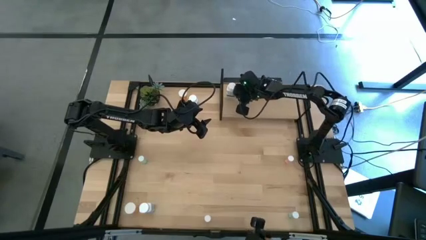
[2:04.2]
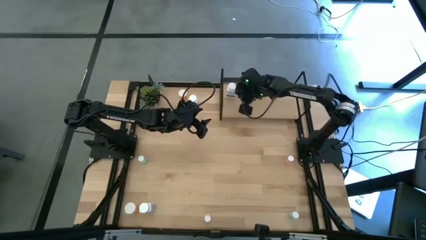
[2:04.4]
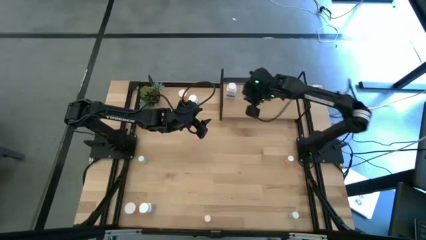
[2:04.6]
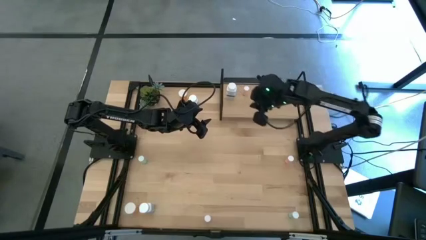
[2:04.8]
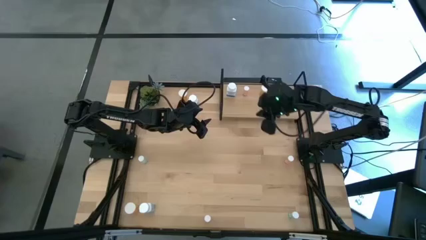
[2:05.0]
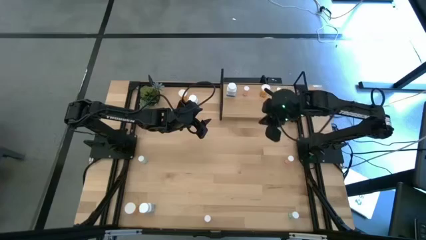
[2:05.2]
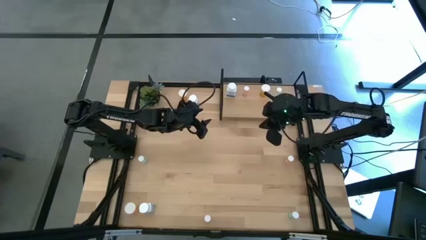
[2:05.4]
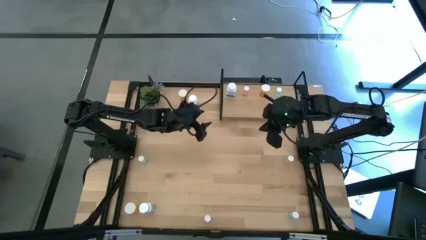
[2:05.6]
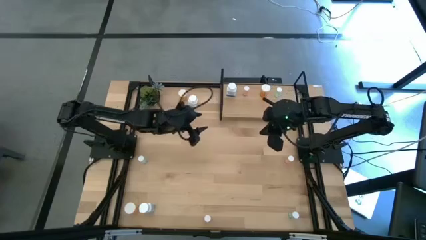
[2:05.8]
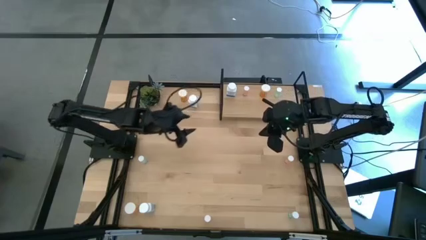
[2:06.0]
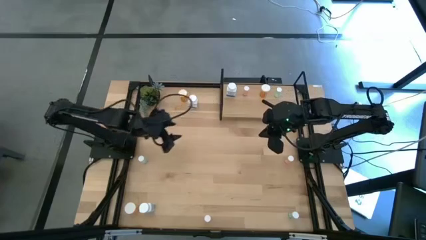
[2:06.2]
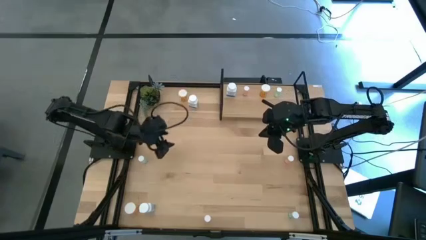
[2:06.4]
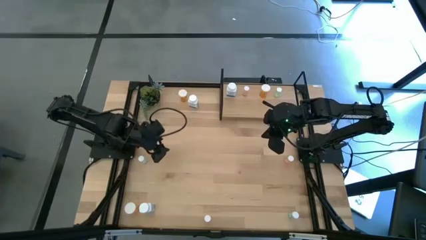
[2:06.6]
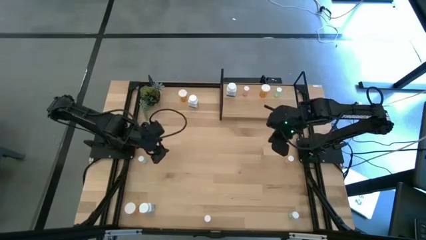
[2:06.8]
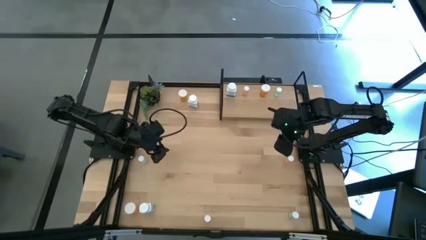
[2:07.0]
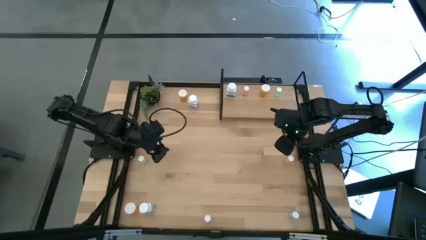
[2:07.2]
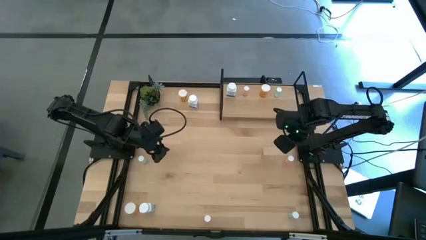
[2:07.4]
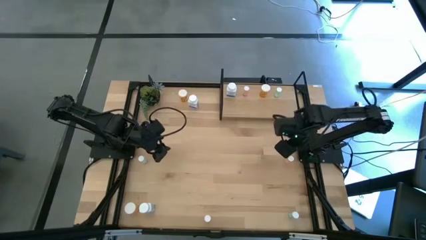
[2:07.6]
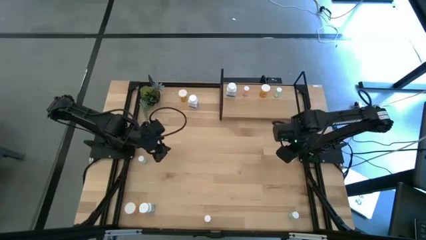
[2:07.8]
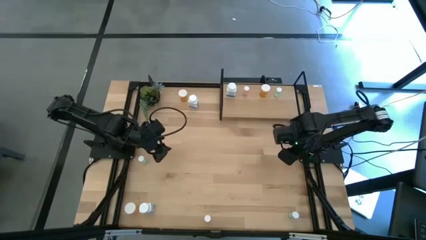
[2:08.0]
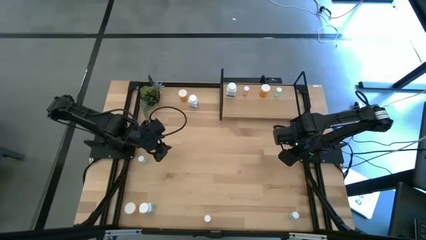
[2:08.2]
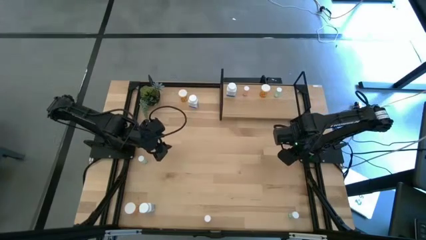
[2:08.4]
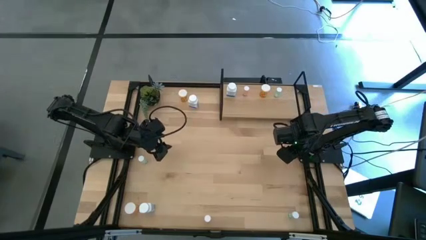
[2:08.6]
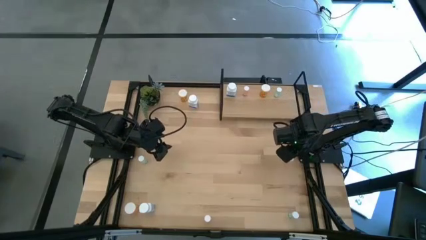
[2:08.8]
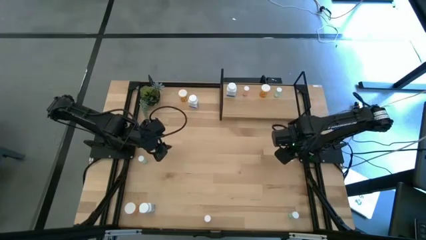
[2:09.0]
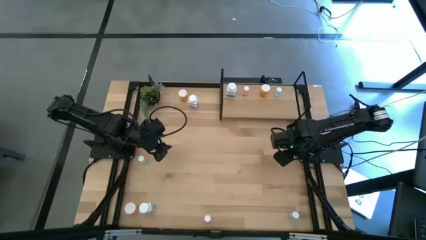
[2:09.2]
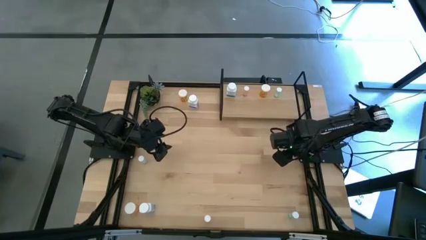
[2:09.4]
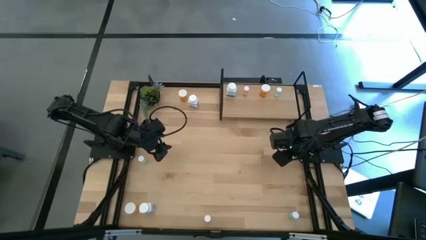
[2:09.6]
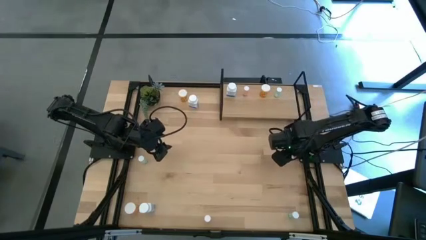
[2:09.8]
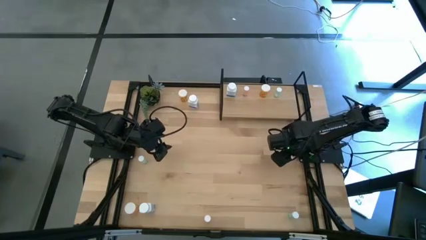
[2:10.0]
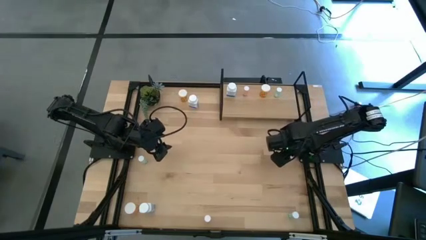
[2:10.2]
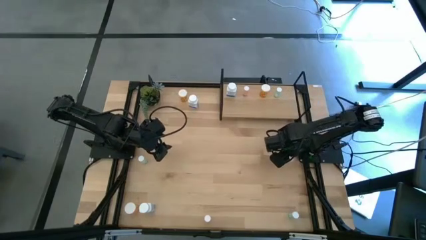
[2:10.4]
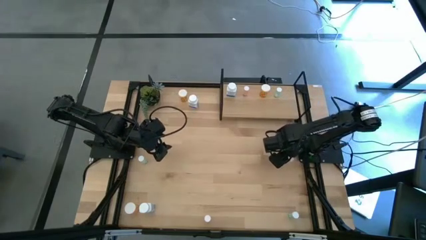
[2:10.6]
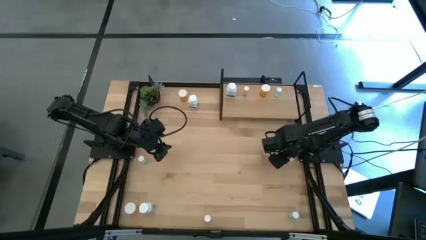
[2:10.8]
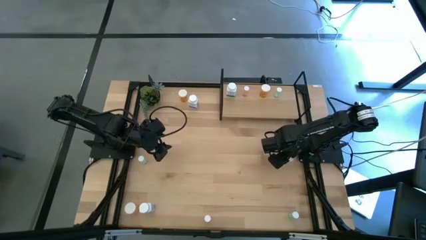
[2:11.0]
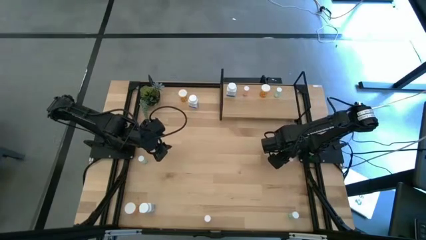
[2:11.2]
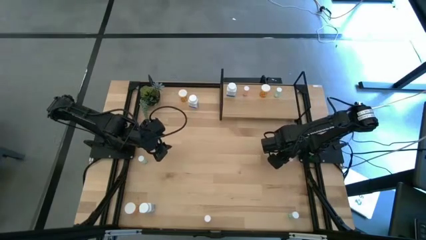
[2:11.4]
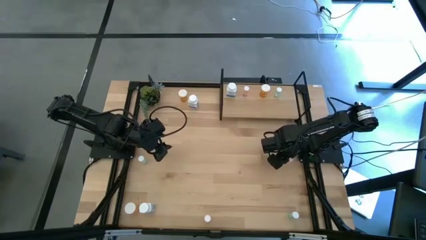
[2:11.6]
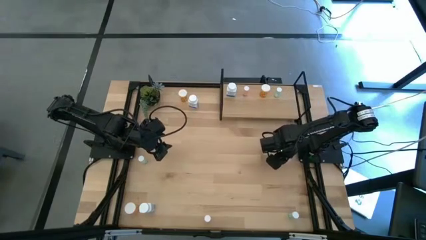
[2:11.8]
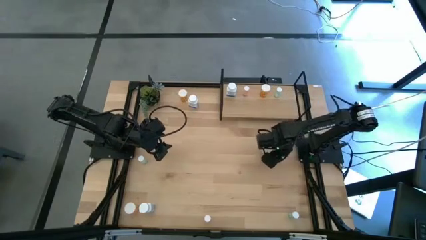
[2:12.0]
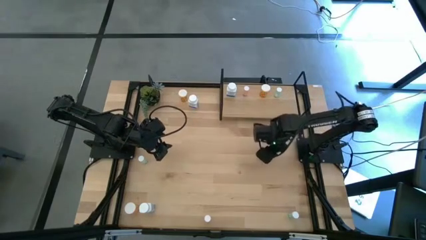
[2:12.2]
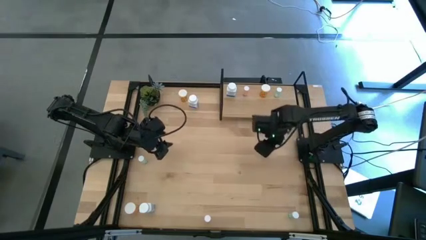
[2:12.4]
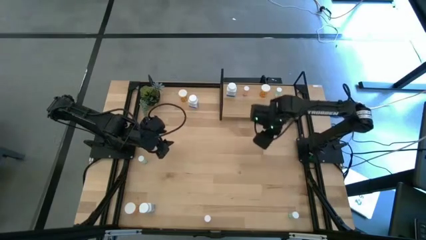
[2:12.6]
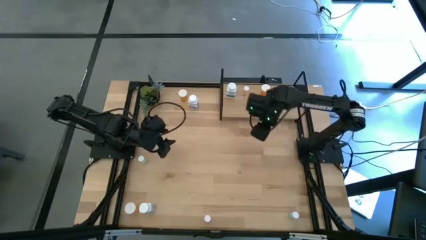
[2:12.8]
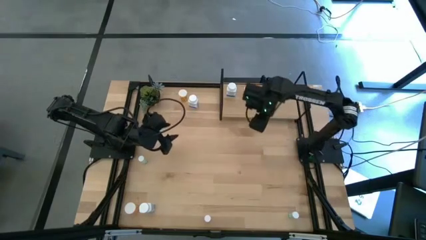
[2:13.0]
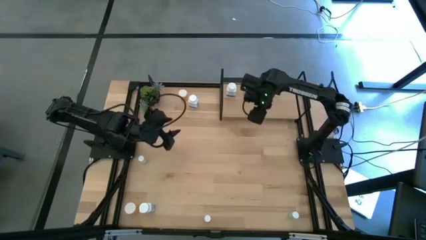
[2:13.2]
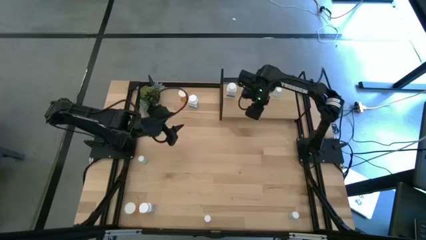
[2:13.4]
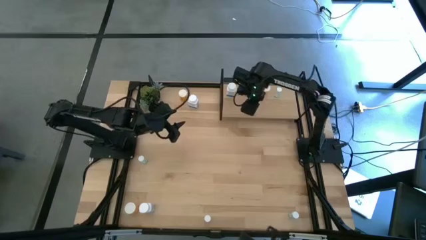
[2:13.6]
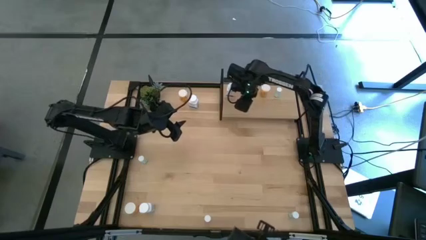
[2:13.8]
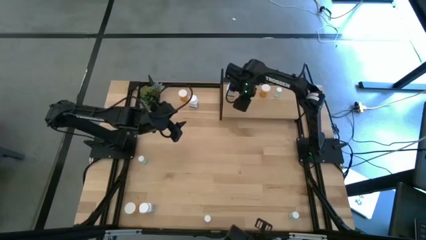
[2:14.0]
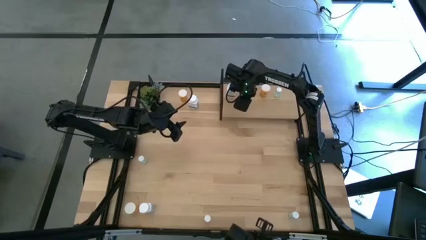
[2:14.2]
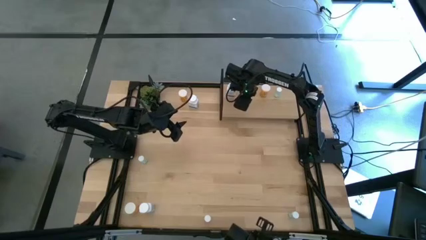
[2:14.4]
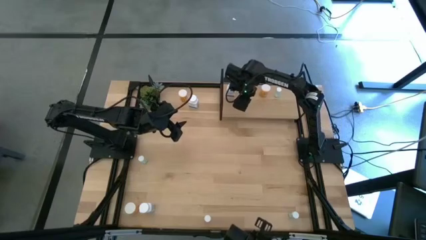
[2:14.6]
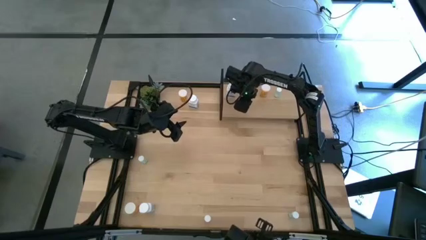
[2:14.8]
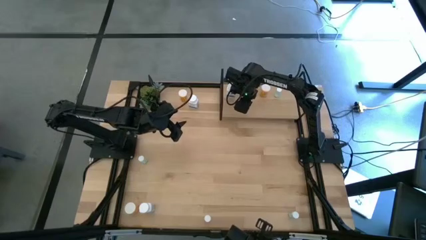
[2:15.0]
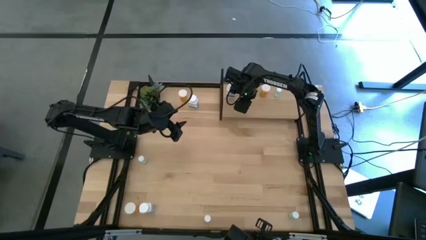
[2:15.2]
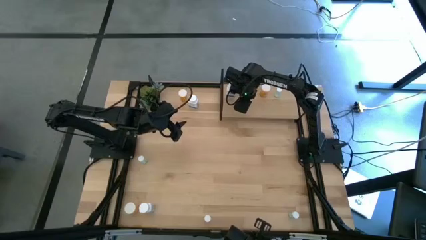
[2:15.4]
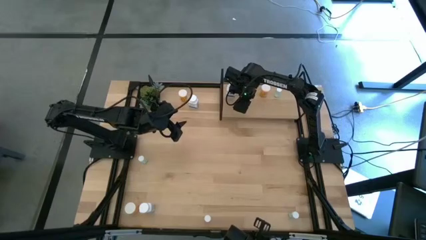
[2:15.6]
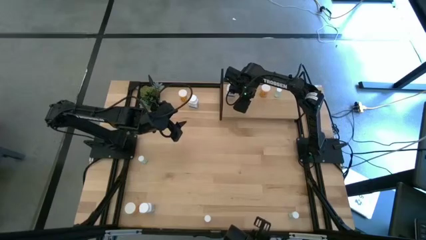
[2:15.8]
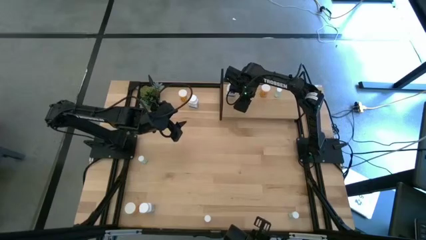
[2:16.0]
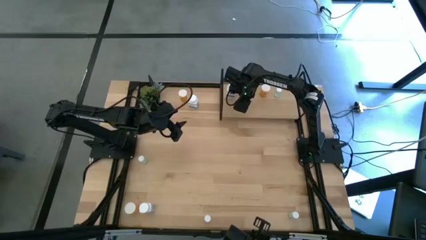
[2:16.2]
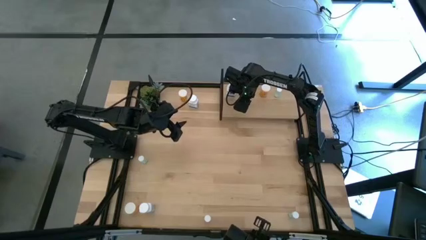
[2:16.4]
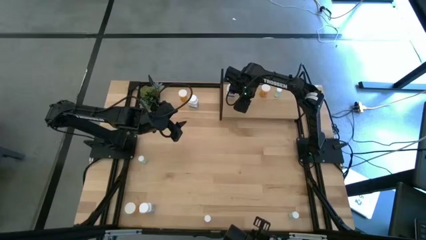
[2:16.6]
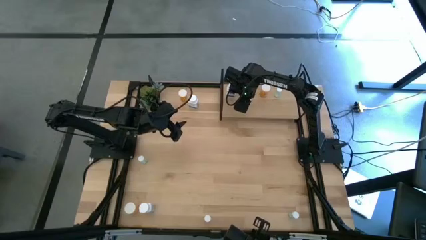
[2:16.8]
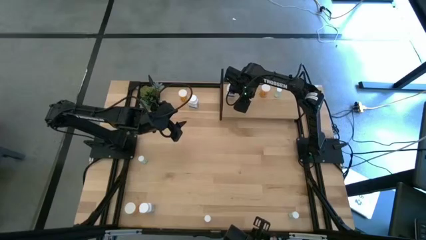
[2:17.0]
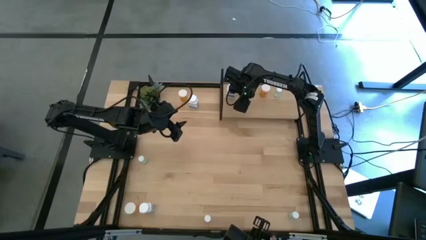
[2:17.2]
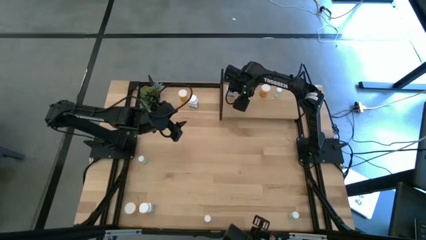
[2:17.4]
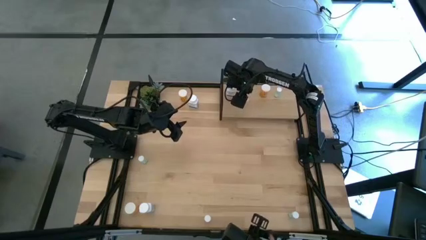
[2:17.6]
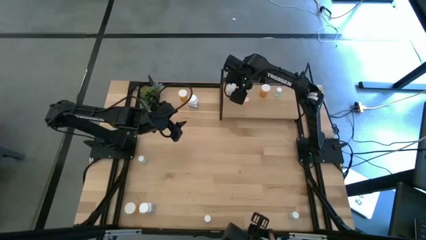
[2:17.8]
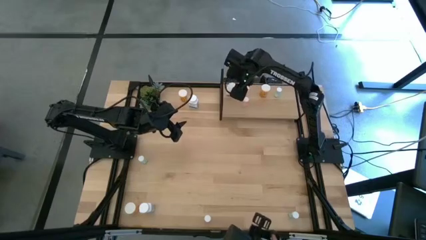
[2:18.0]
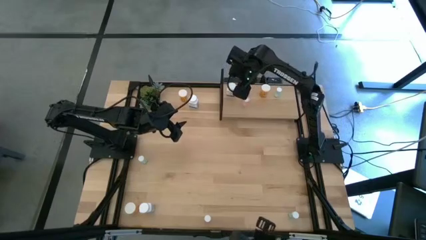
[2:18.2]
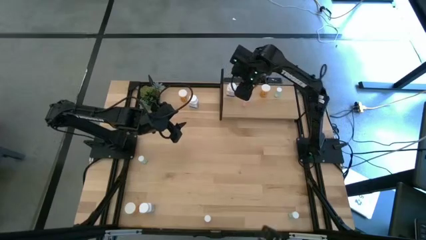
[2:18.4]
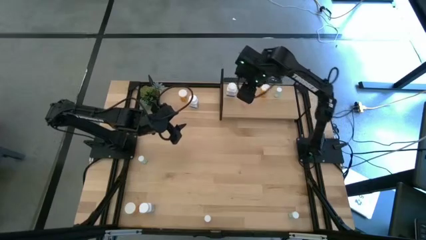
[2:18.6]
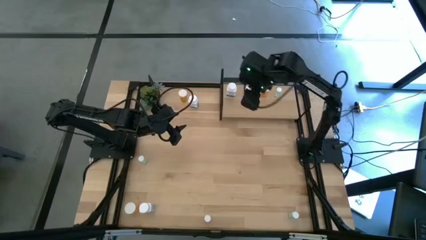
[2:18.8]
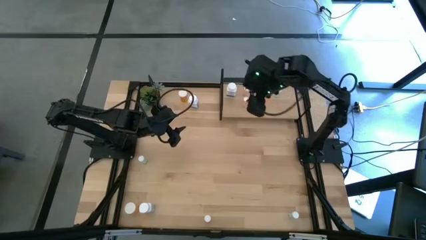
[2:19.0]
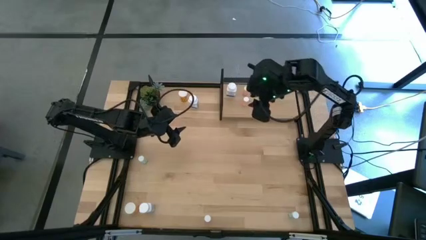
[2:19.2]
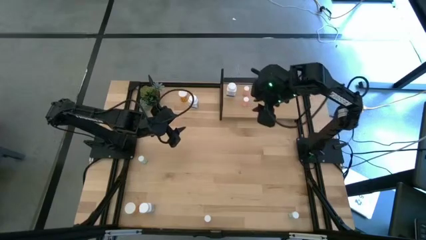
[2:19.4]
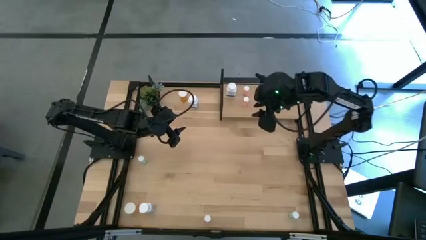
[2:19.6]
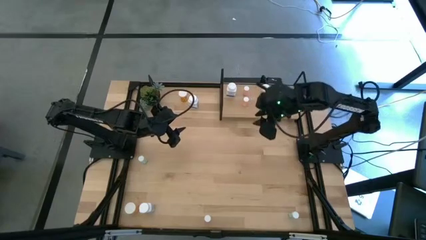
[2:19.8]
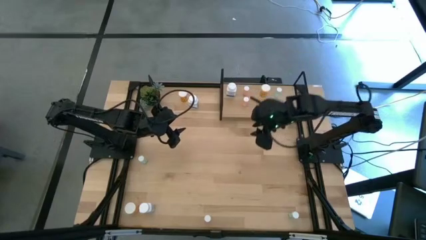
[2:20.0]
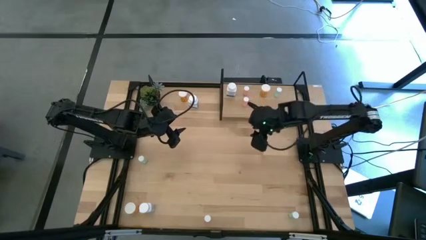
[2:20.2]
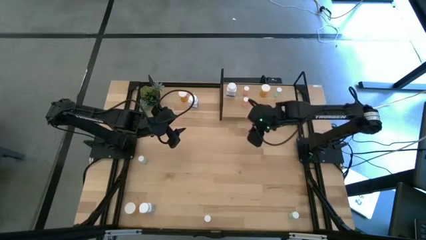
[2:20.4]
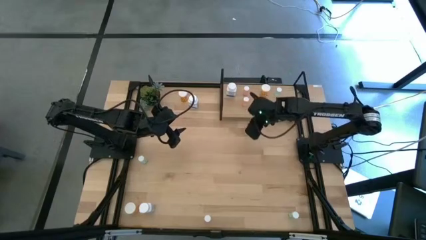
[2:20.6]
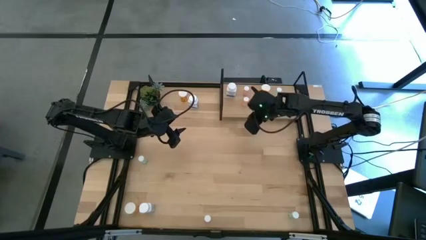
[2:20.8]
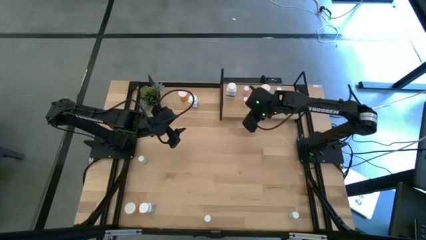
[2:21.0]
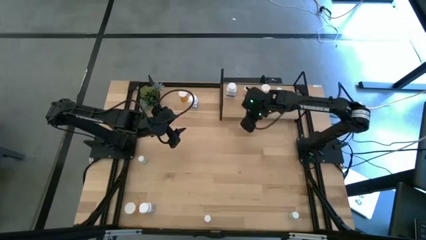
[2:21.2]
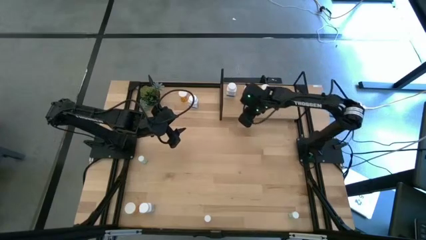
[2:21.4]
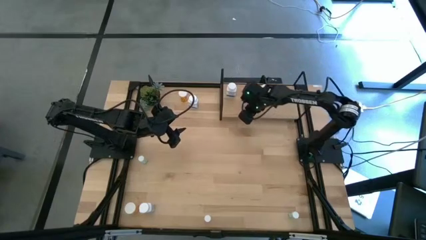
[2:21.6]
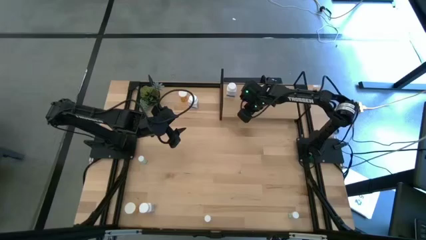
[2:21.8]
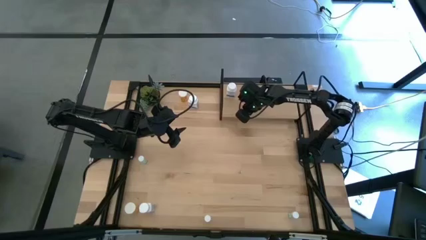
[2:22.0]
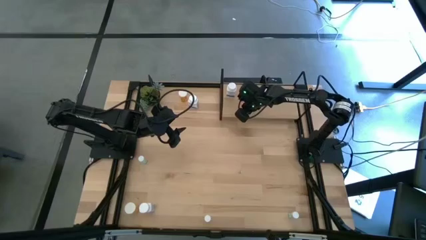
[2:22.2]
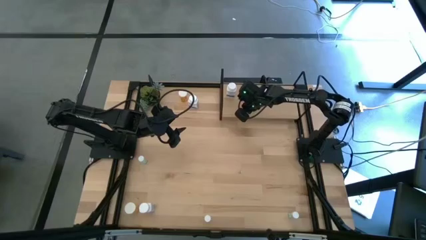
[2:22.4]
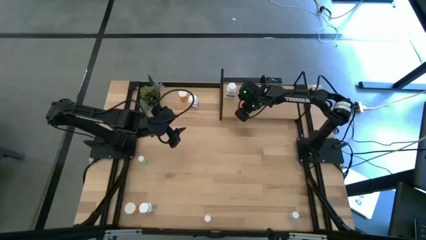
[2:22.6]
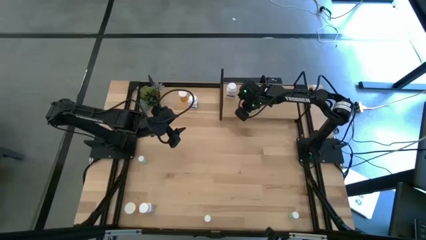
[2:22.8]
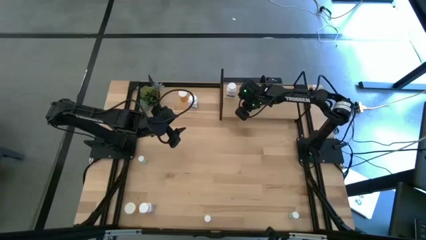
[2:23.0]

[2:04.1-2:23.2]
Task: Pick and place medicine bottles onto shelf by color
Put the top pink pill bottle on the shelf aligned with the other pink bottle
